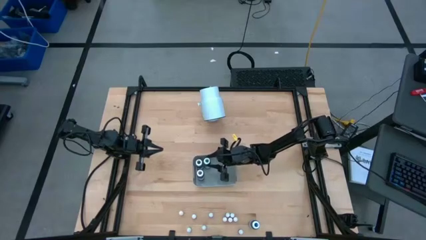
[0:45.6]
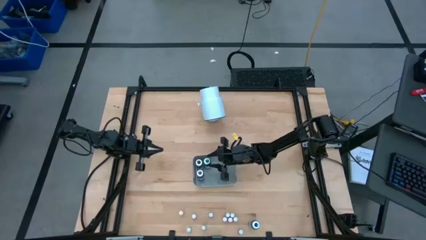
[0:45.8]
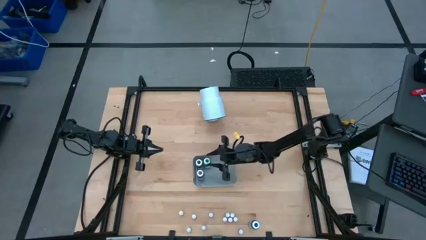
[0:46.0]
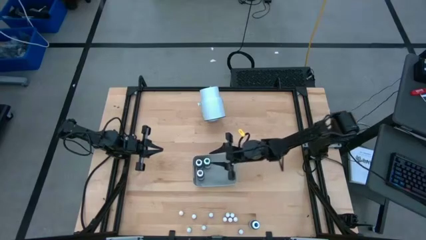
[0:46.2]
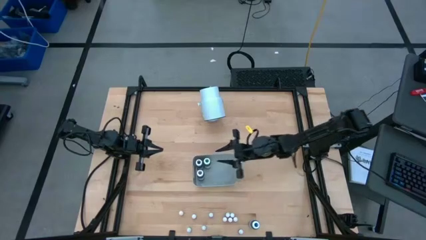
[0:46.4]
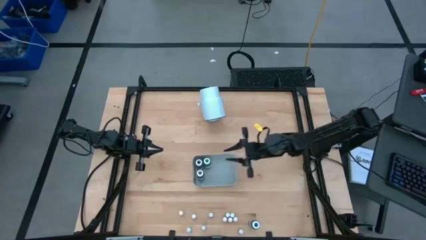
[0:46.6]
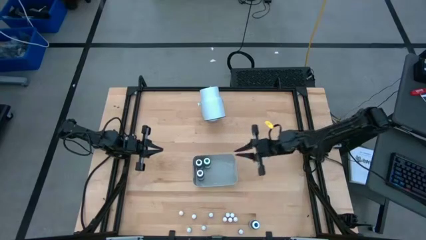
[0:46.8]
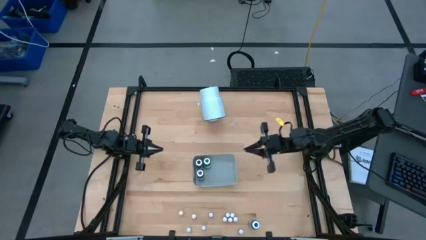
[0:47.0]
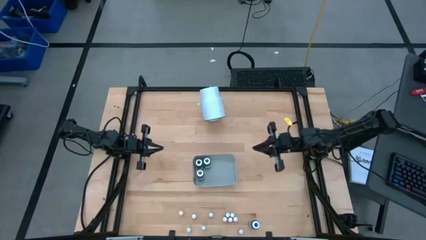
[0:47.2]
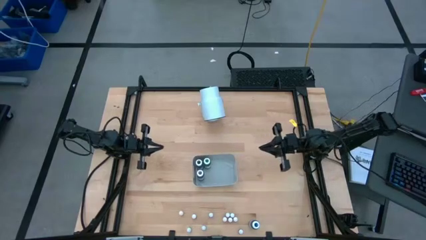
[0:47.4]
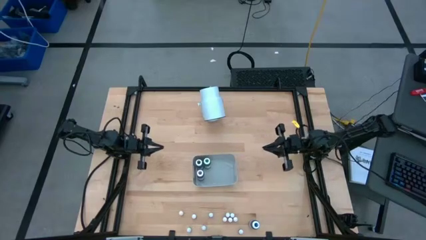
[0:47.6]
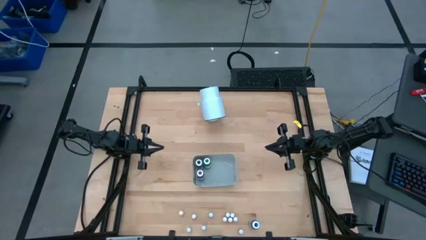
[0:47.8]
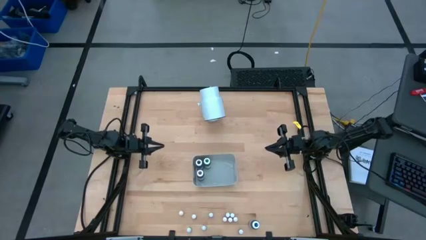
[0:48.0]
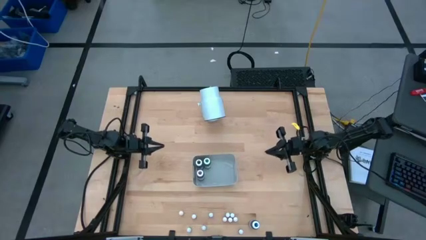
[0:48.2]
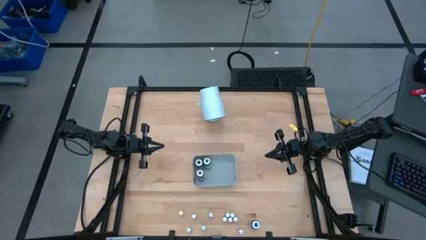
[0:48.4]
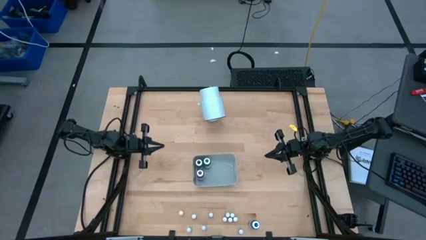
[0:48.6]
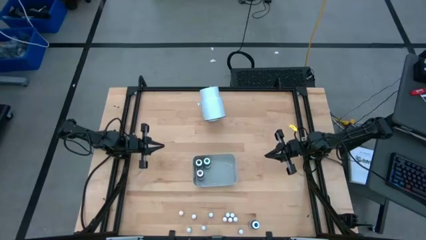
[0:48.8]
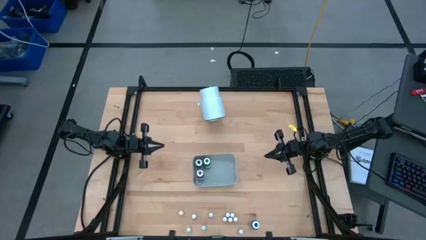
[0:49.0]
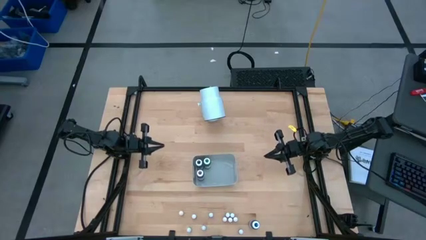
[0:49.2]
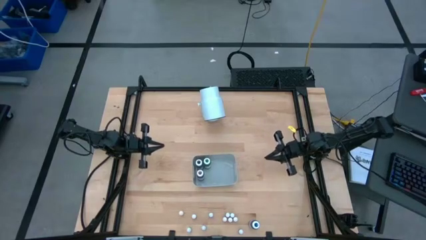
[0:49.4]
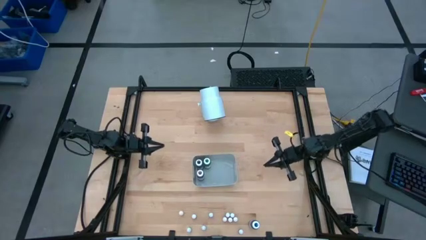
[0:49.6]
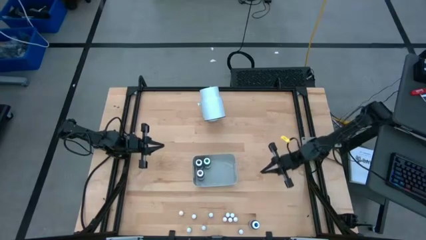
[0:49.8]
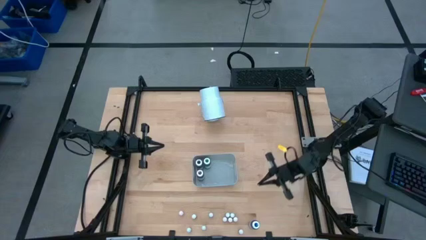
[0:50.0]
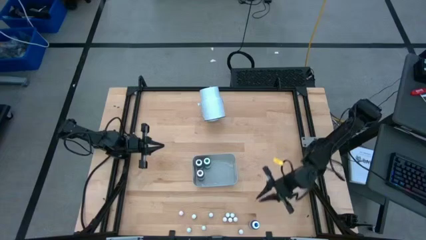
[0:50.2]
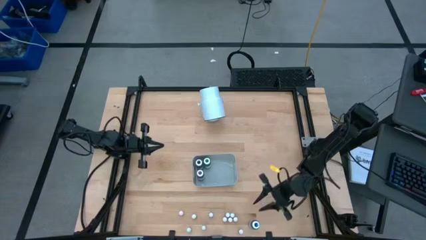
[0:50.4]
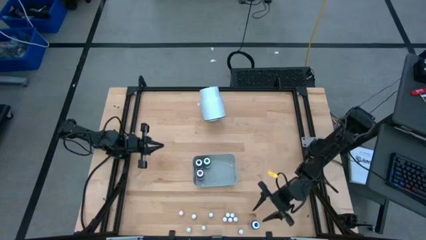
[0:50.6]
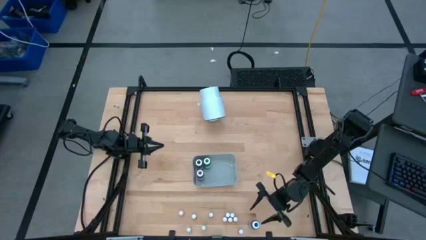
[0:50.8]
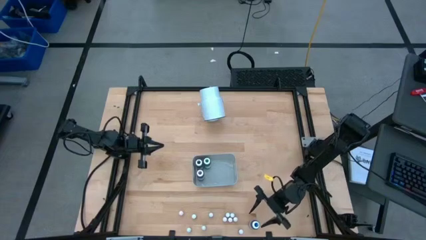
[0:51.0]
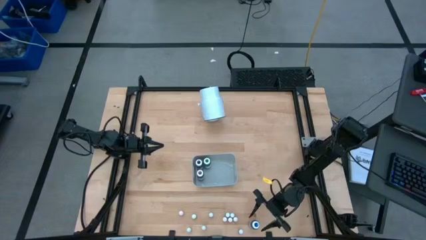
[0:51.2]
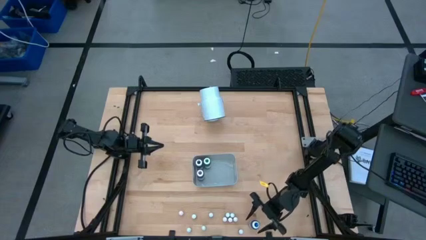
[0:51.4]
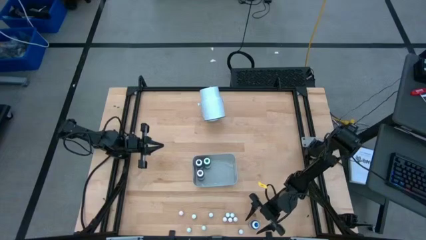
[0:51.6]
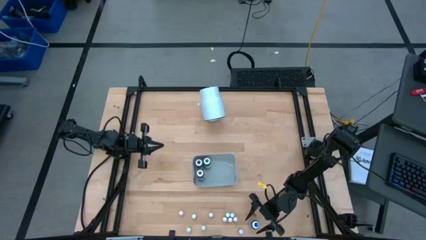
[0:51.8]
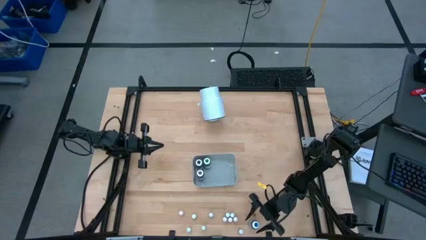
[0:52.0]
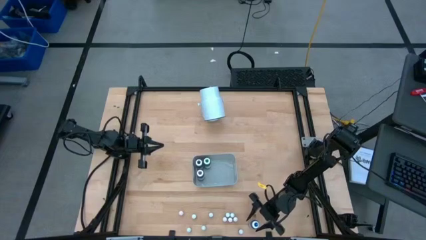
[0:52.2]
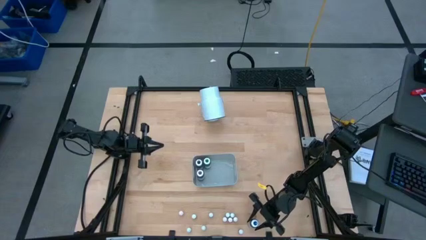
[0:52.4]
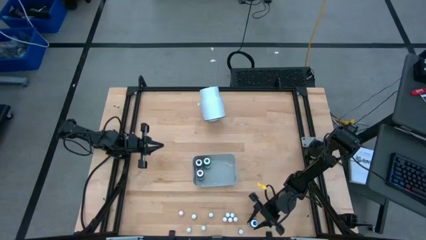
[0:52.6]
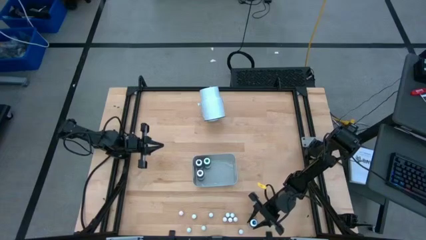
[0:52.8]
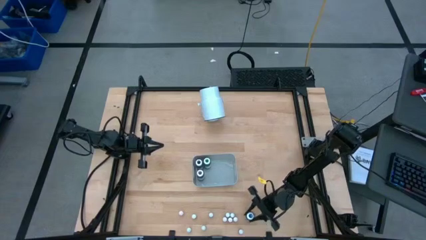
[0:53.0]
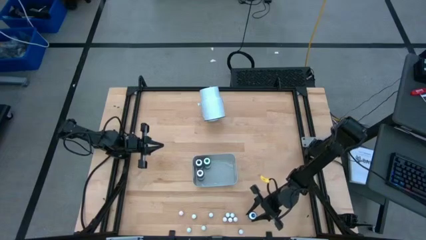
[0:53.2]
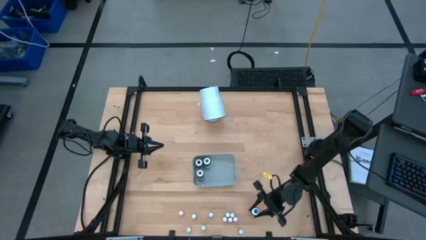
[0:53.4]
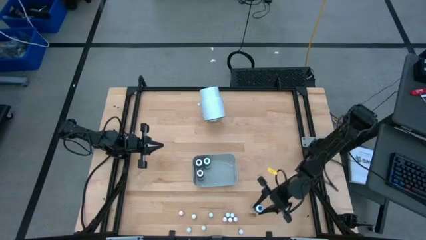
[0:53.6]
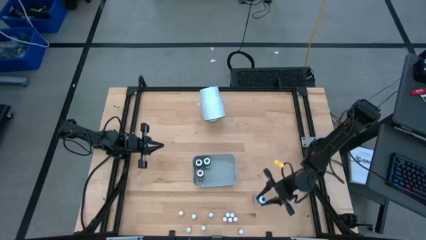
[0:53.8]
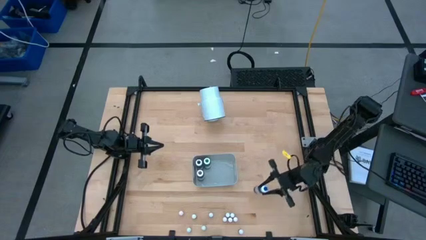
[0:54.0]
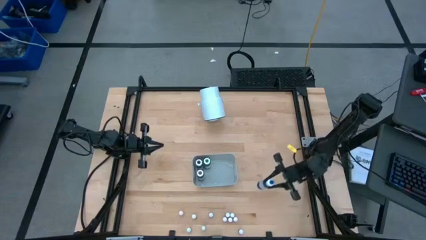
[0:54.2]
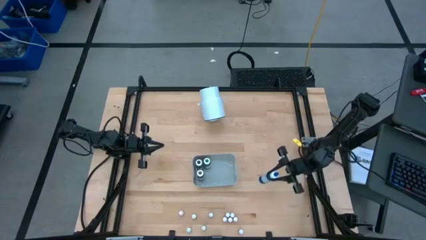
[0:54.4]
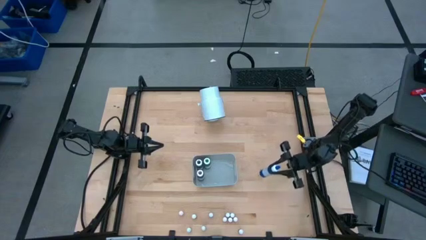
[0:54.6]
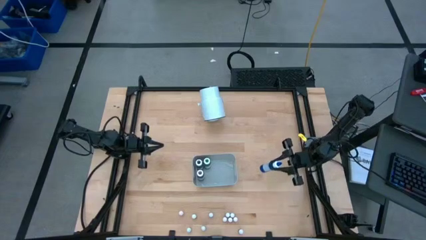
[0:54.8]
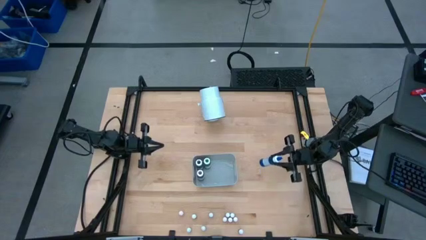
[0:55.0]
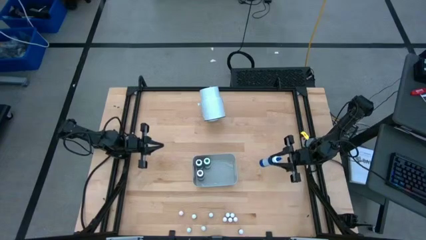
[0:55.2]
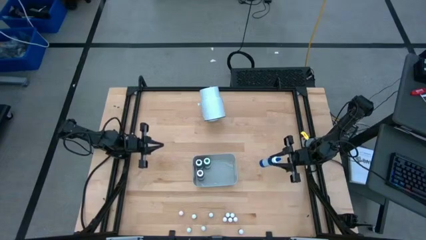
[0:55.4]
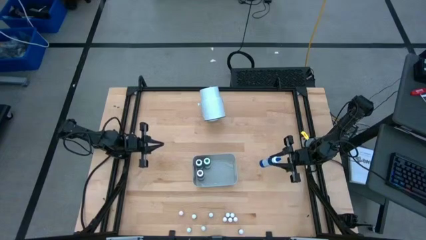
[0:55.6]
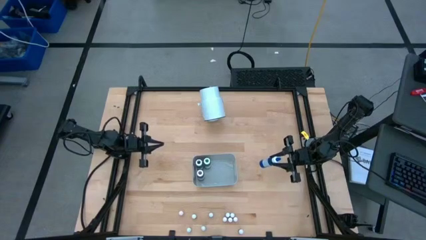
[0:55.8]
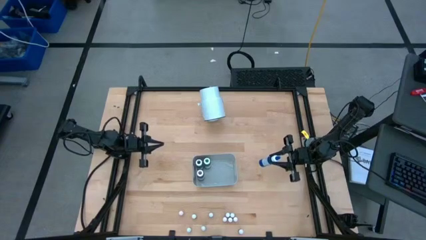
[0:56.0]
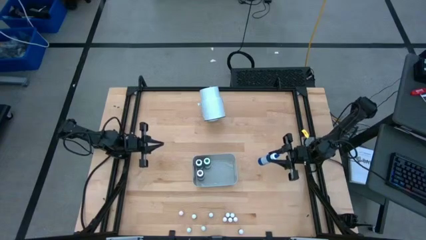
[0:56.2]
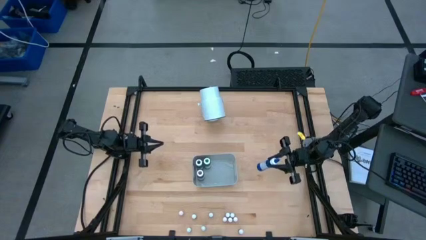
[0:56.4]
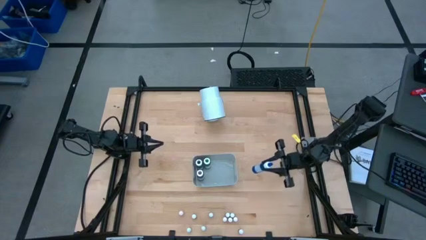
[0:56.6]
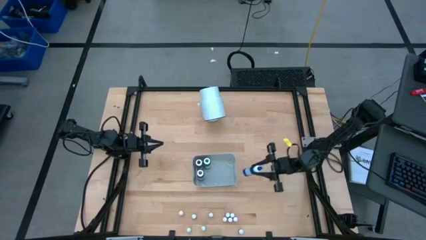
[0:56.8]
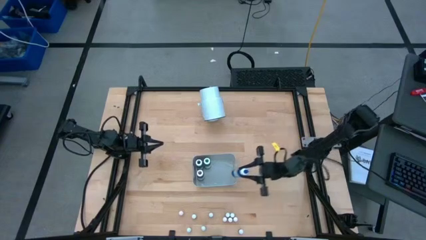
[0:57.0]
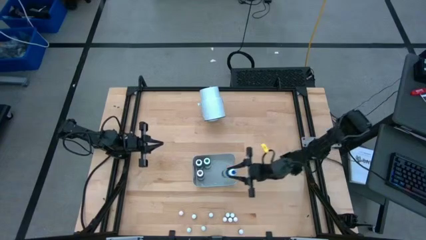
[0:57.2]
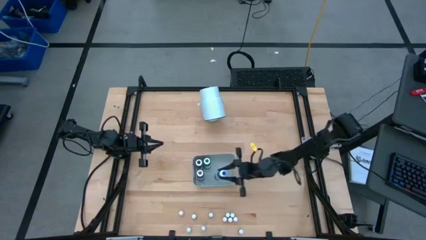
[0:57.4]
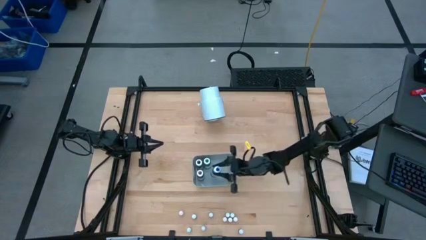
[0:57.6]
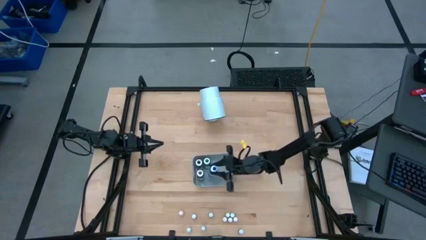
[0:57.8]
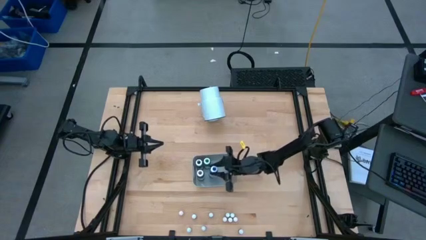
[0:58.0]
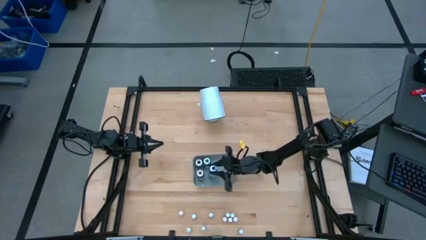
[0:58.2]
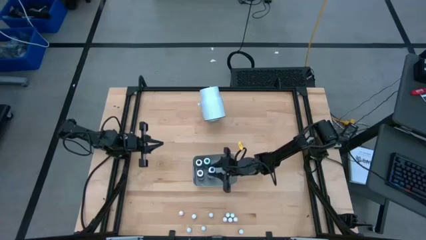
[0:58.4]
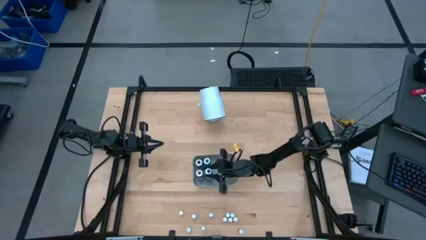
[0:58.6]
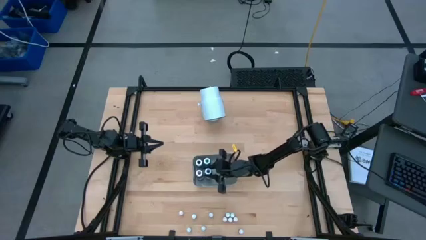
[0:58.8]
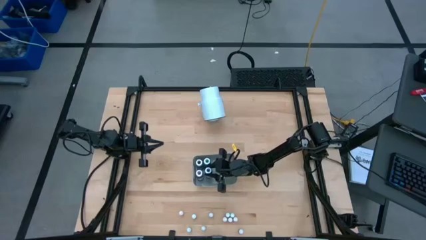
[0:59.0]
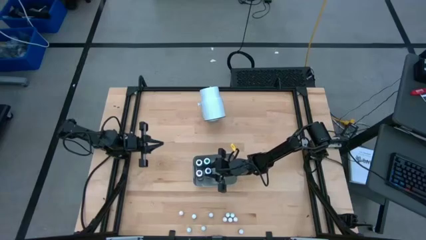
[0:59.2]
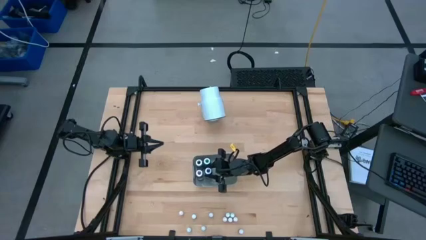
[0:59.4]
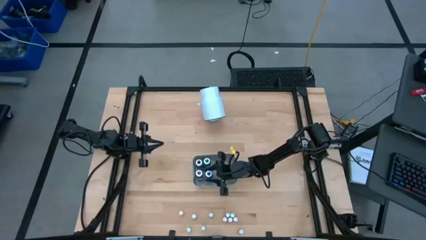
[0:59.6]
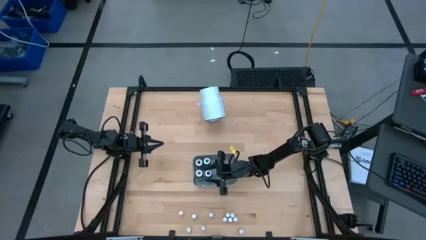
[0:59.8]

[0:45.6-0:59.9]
Task: Pick & Place food coloring
Put the big blue food coloring bottle into the gray bin

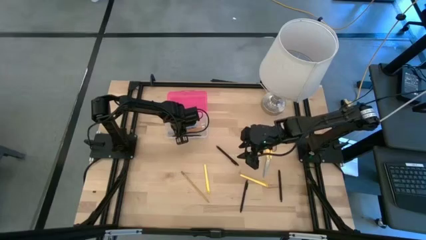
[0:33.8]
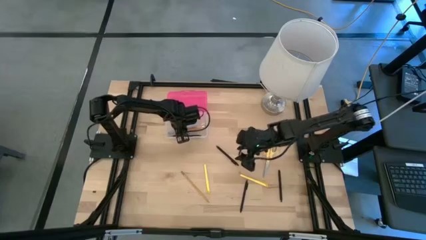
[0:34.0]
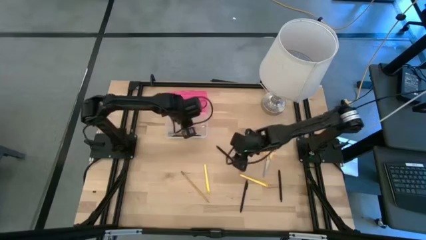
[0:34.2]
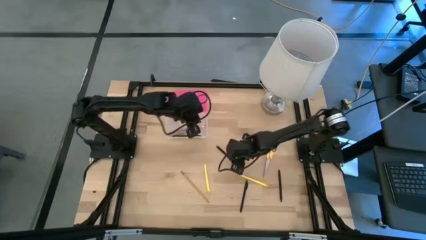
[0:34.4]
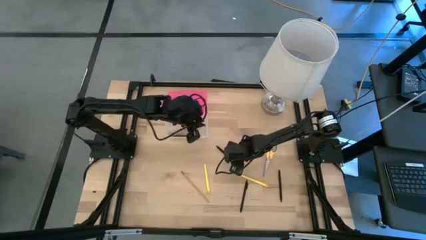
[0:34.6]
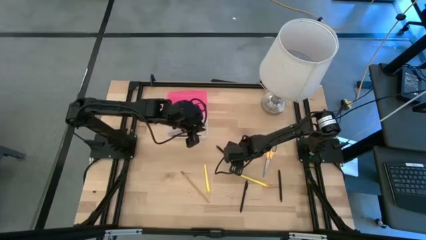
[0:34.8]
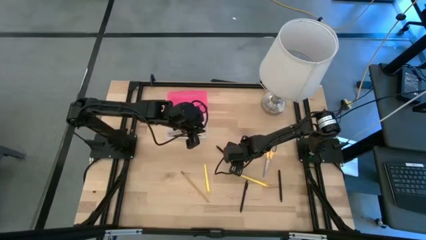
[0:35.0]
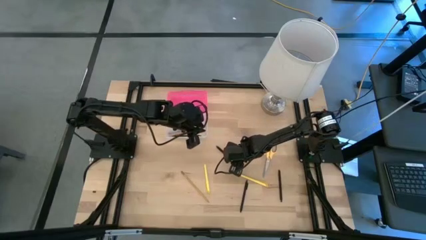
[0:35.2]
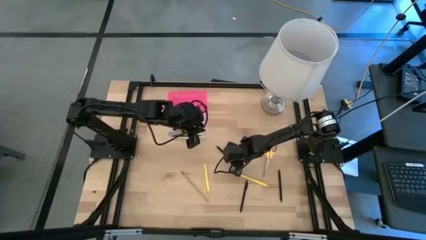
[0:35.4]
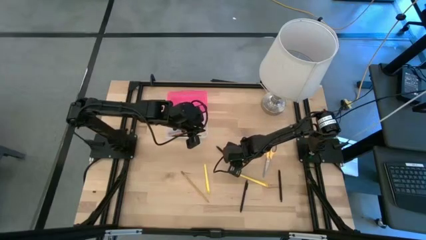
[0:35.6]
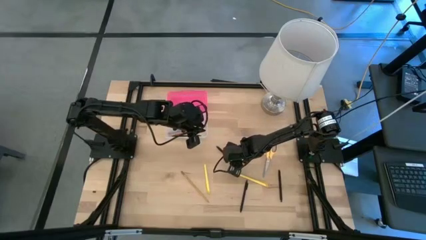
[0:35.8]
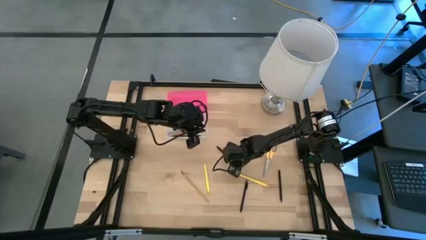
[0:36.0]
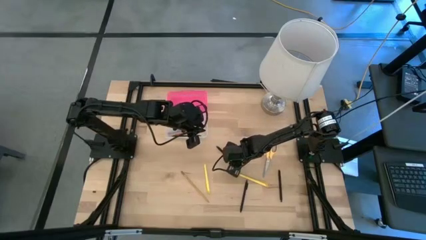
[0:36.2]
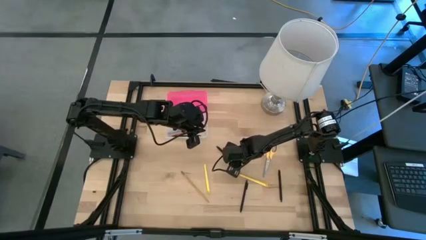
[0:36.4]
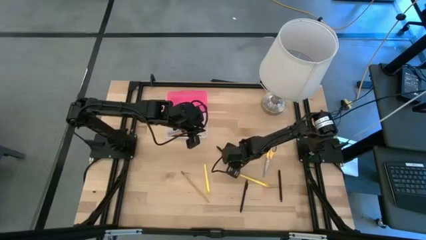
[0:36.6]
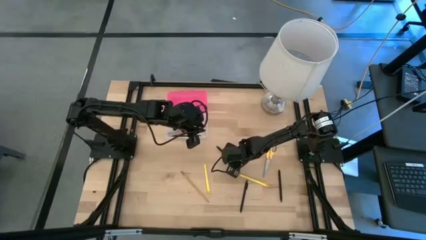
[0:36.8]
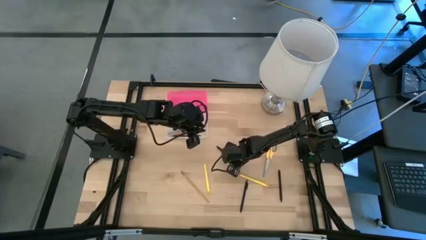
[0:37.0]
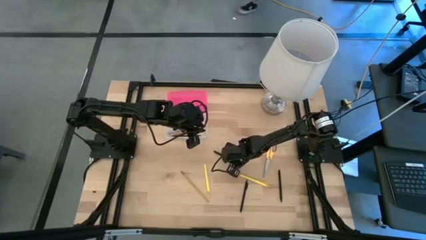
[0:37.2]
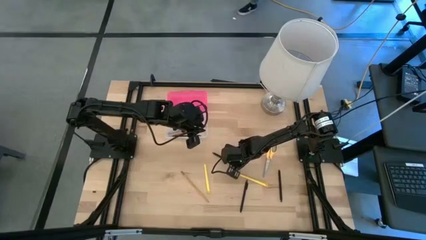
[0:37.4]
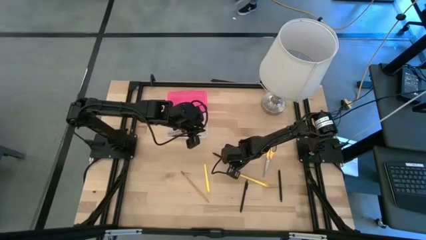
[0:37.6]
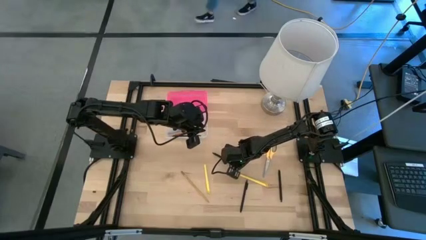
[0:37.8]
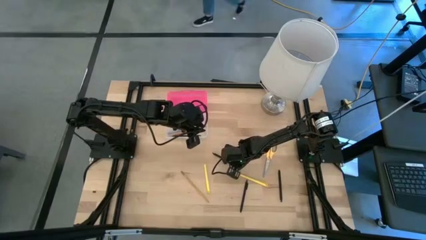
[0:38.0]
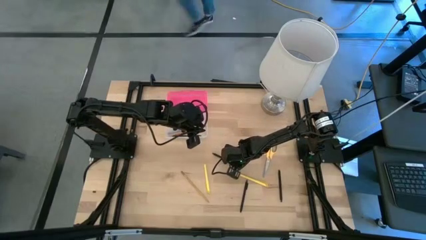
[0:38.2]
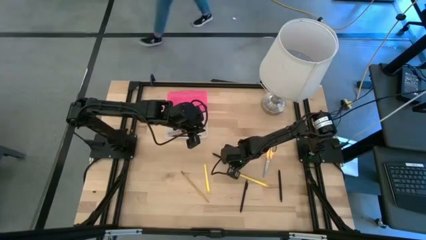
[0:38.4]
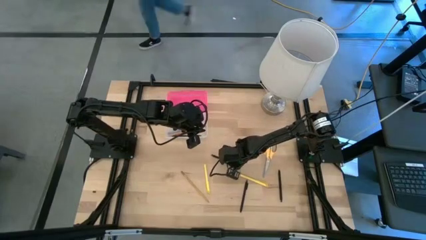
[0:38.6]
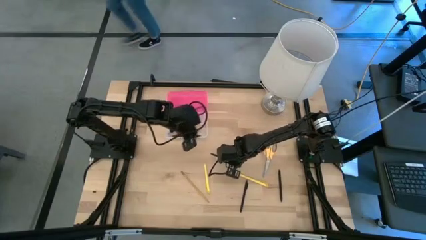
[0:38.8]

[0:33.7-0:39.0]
Task: Pick & place school supplies into a supply box
Put the black pen into the pink supply box
